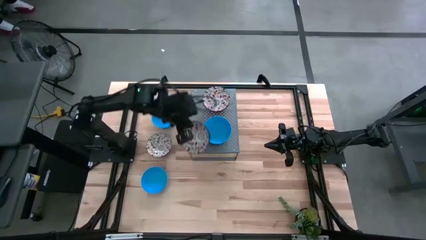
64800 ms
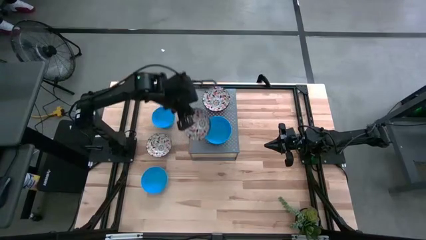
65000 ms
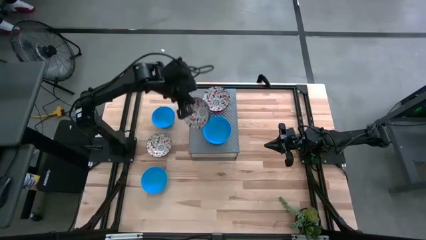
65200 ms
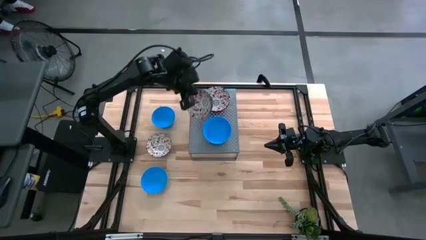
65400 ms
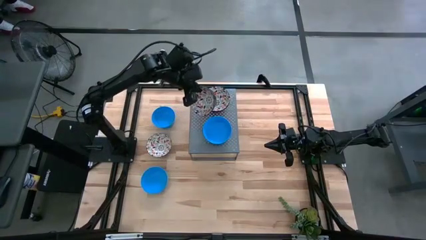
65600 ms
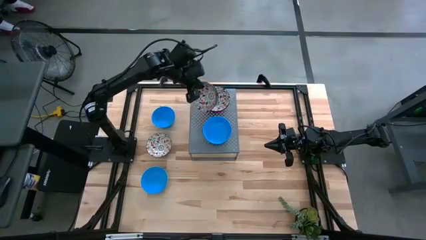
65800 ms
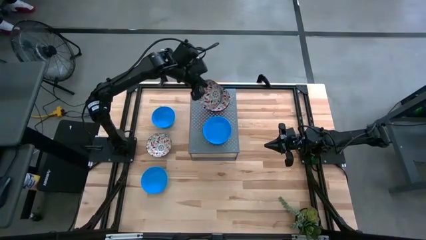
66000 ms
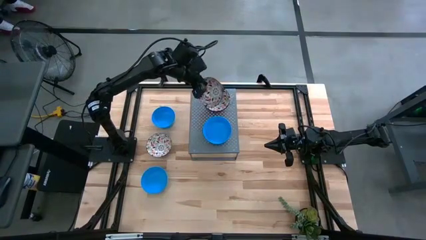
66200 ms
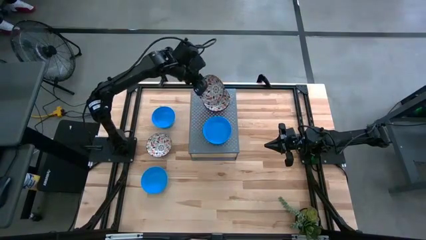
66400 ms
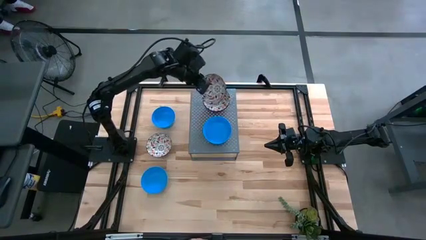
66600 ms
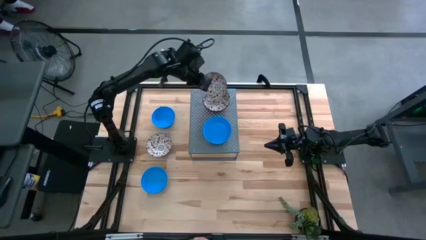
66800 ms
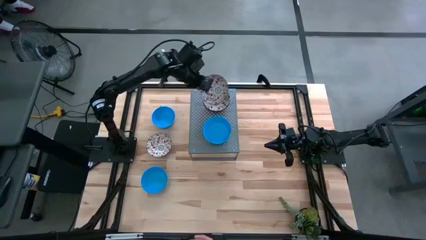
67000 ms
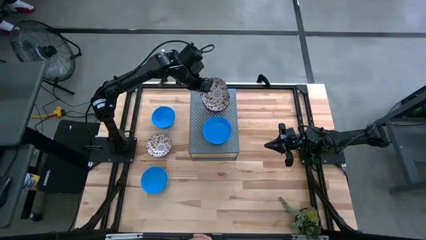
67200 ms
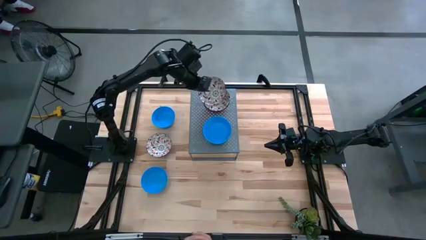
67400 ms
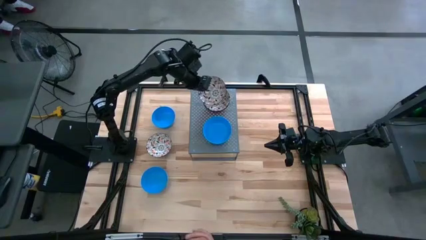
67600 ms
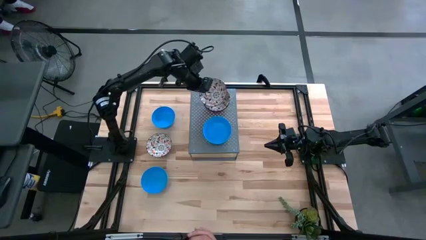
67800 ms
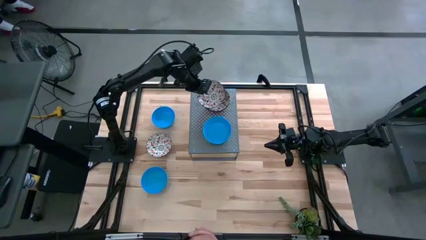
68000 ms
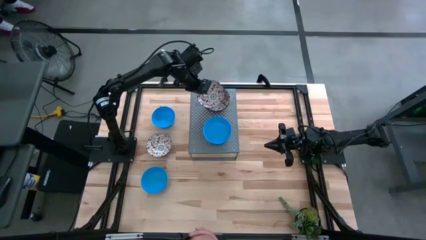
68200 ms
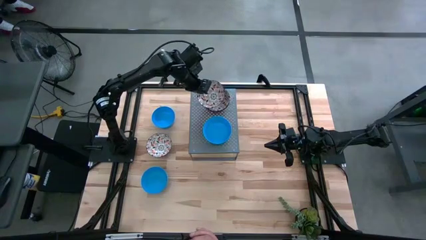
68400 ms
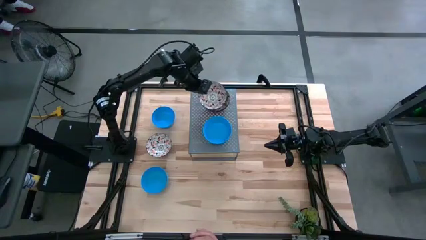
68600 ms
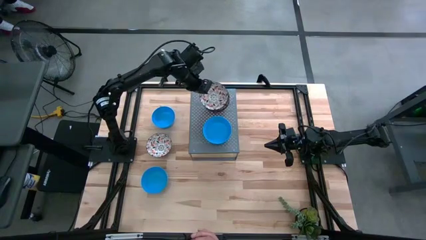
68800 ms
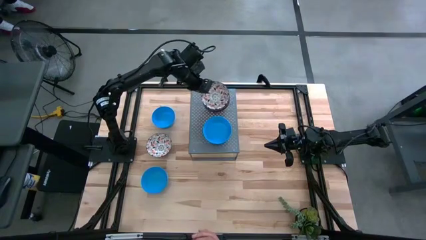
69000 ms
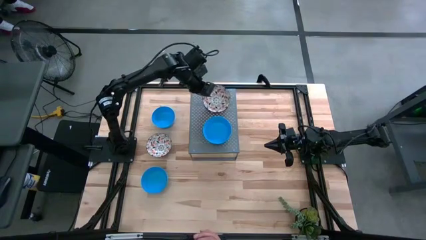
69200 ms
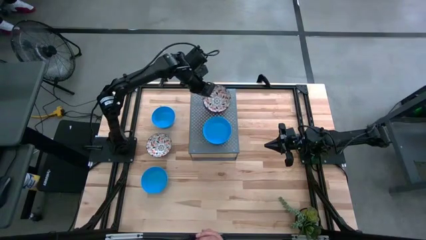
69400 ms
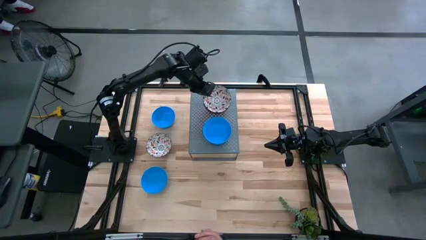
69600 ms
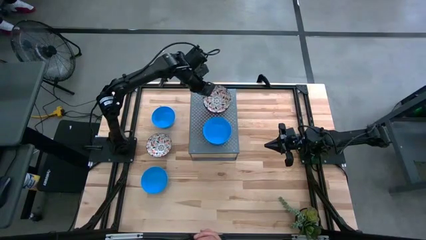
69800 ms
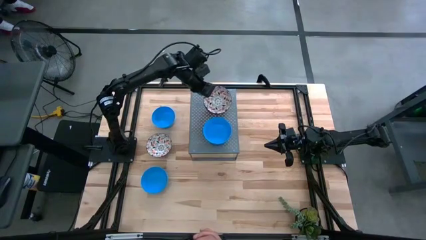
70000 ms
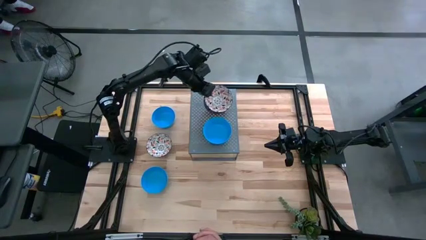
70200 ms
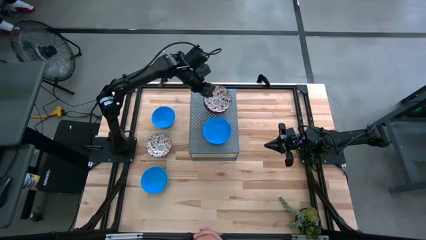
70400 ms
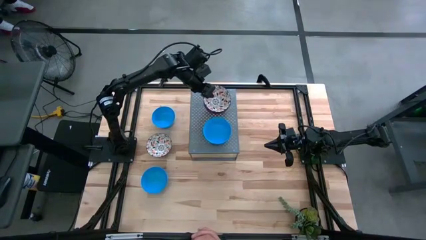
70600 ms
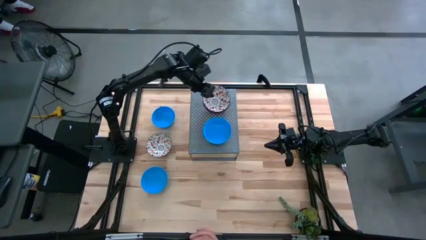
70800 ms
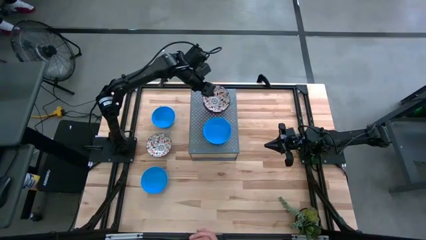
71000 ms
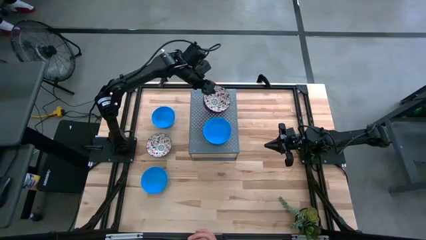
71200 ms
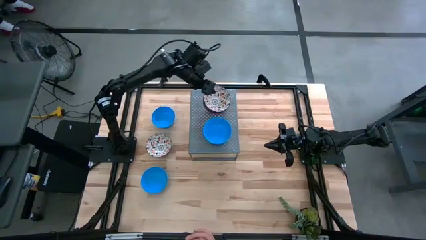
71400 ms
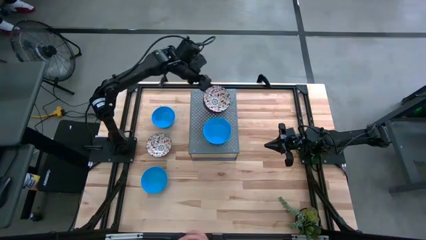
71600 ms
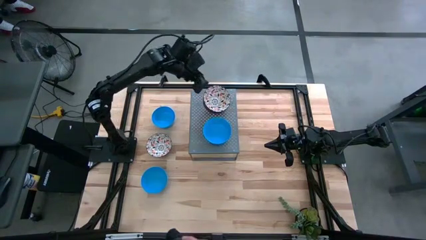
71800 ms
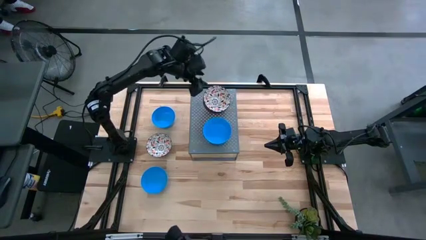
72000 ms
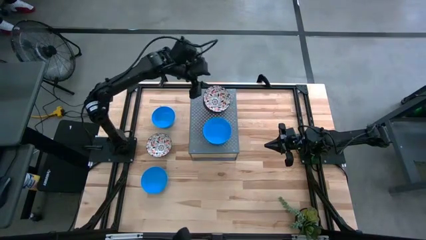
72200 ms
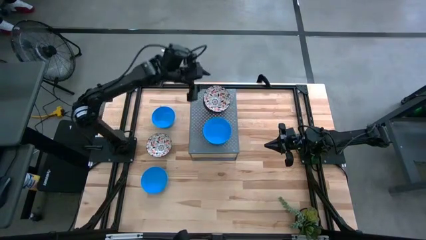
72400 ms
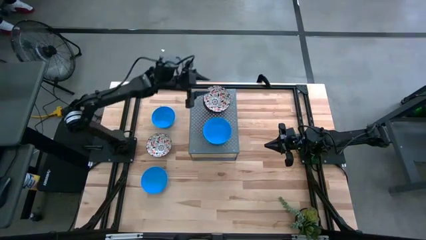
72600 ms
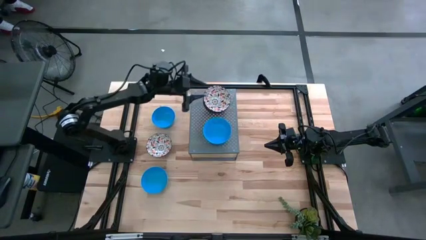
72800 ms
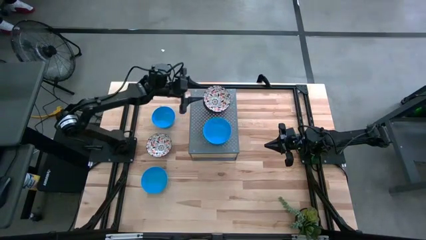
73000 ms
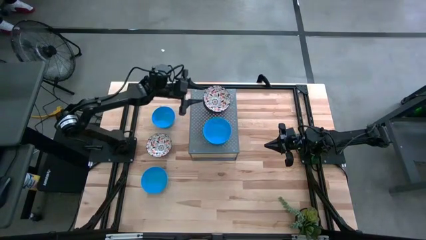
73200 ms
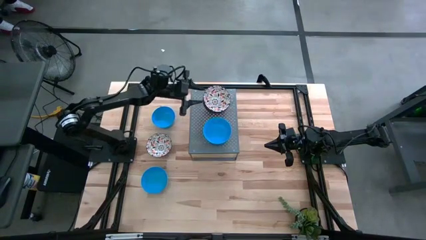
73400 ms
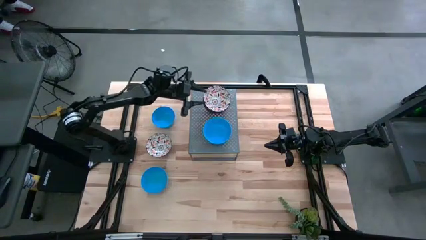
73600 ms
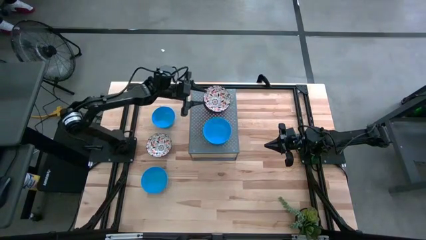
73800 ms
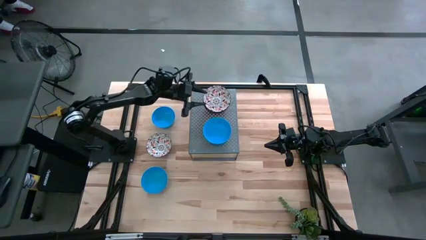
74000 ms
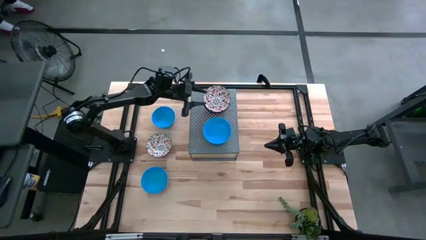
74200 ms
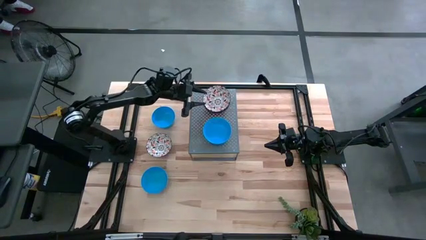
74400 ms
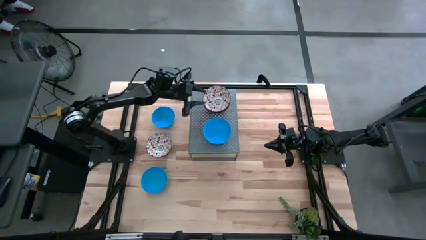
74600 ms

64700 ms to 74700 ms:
Task: Pick & Place Mini bowls
Stack the white patterned bowl on the white patterned bowls on the shelf

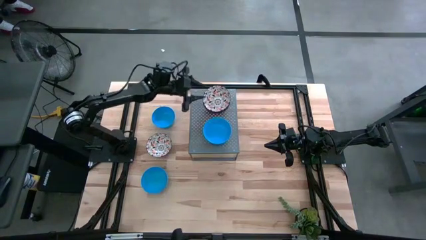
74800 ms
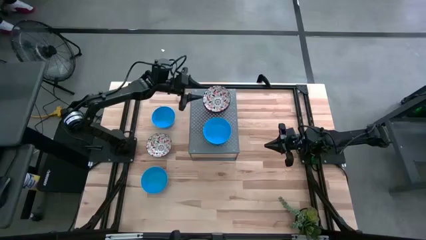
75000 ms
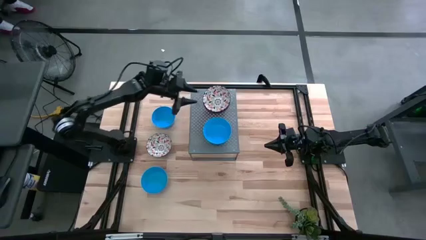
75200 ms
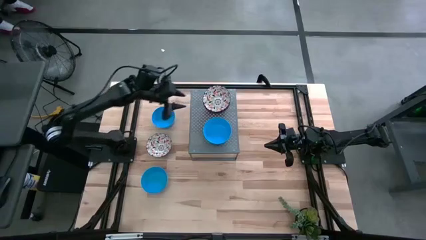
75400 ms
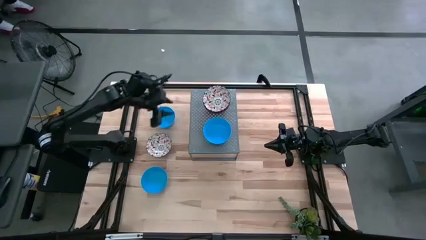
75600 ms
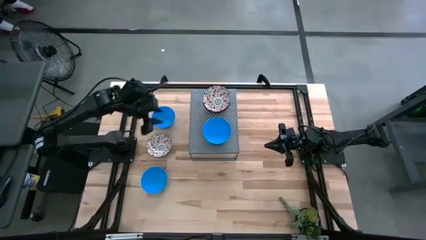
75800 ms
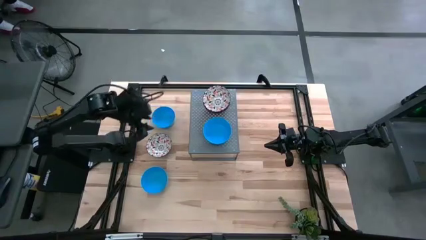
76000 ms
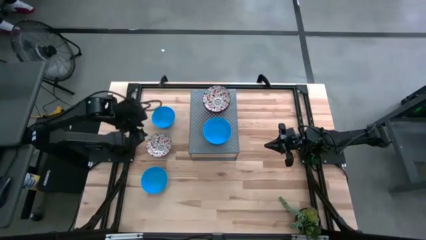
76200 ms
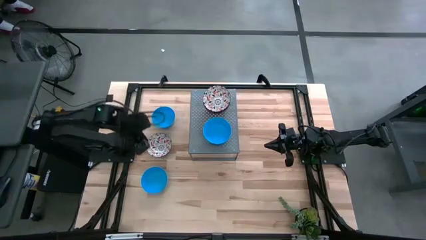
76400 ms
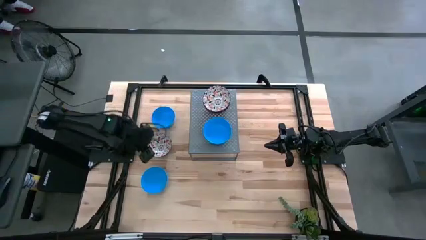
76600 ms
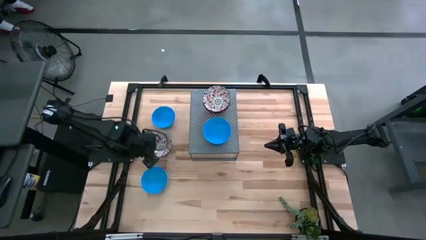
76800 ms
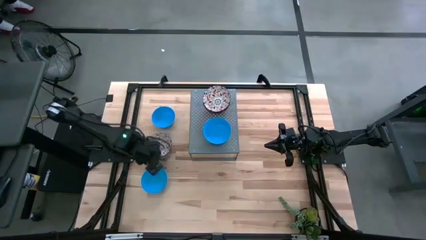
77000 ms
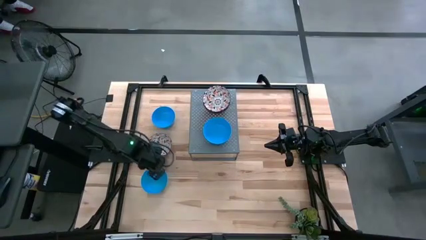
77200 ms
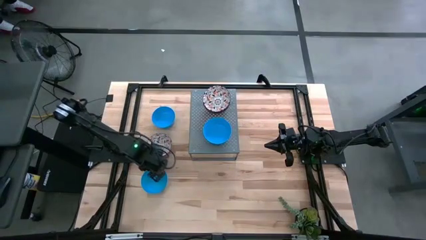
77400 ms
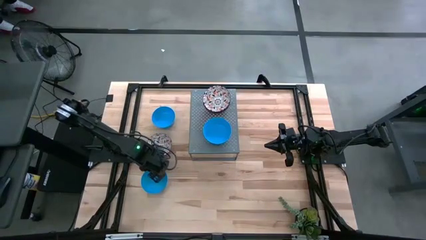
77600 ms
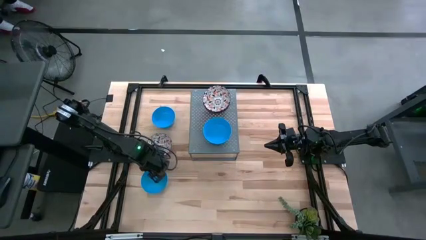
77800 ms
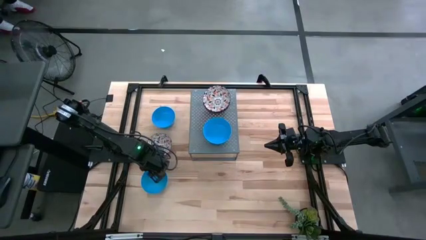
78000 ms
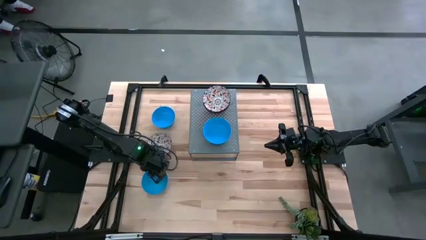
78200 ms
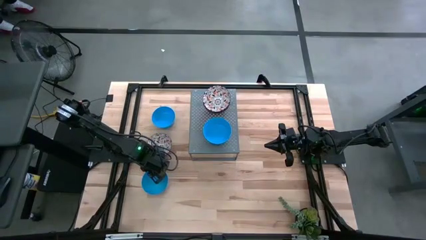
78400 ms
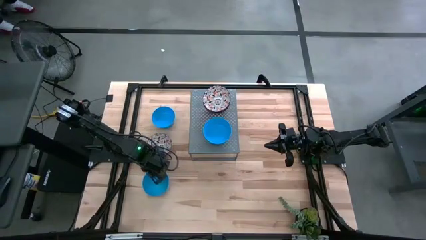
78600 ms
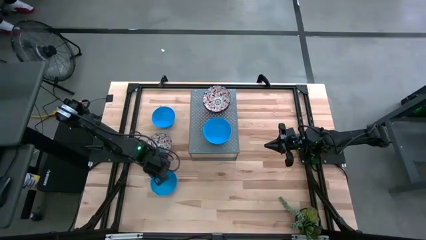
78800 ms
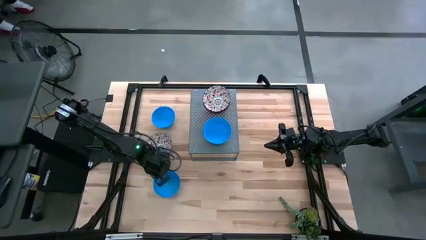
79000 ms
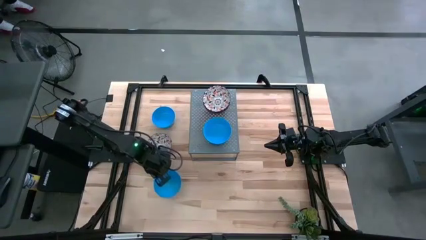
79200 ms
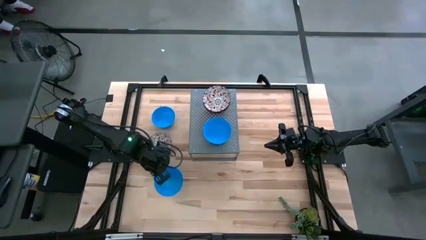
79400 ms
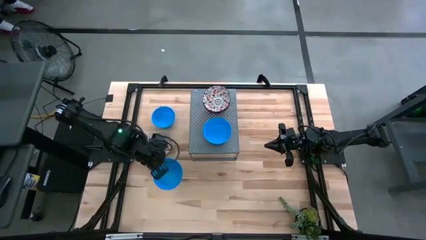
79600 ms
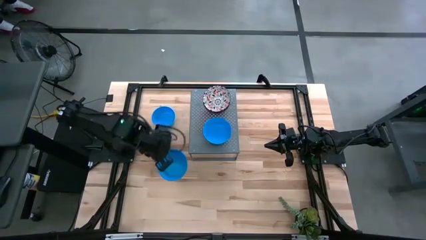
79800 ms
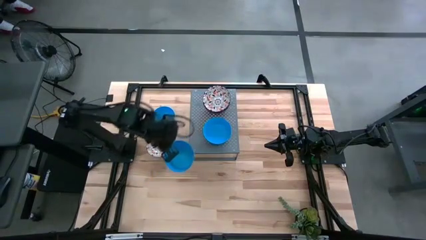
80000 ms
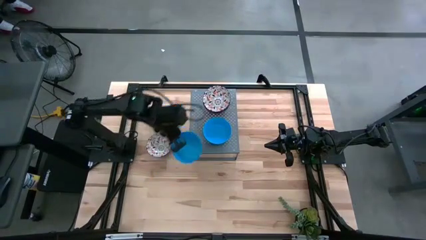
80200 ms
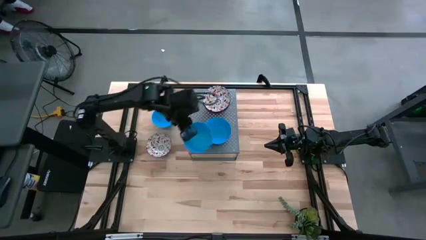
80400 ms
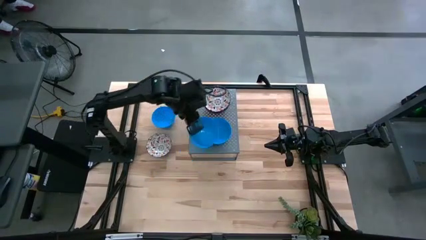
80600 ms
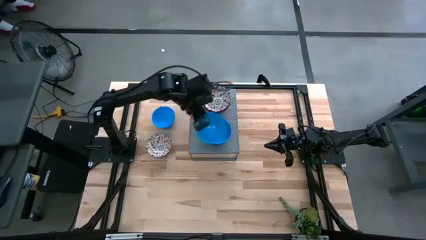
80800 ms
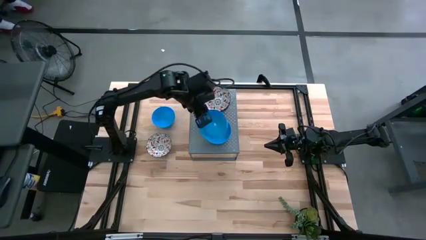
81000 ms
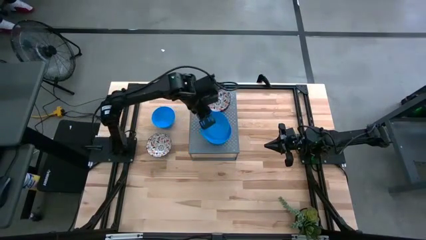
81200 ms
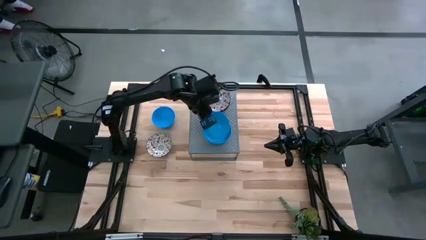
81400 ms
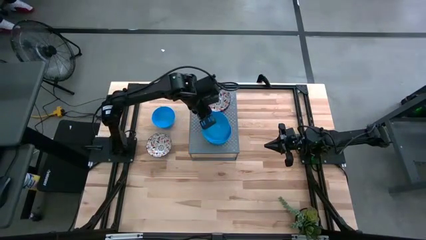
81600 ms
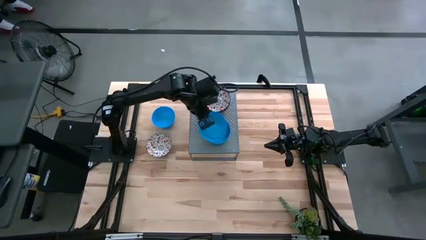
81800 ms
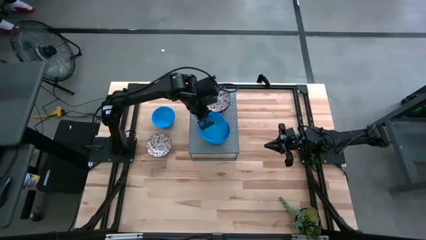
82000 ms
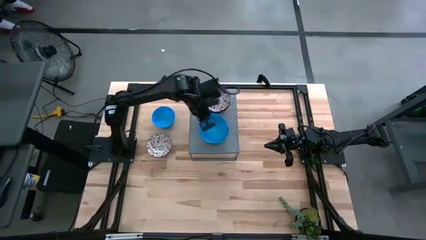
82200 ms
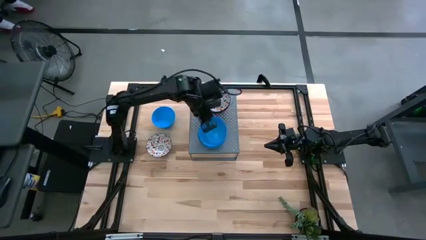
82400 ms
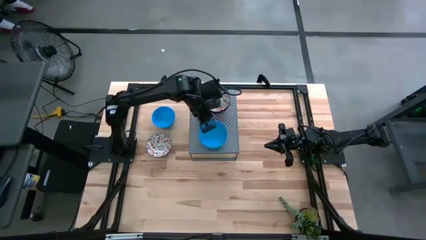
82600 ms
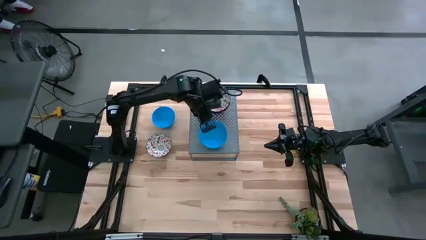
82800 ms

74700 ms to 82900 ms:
Stack the blue bowl on the blue bowls on the shelf
